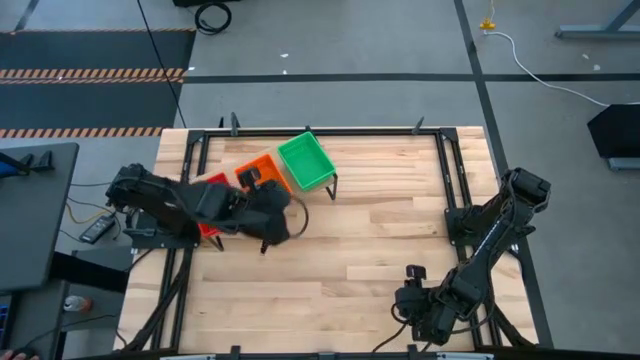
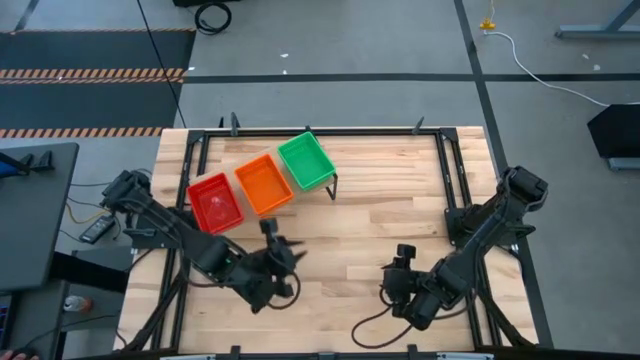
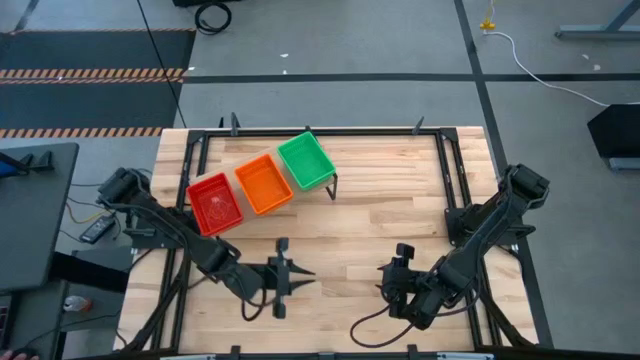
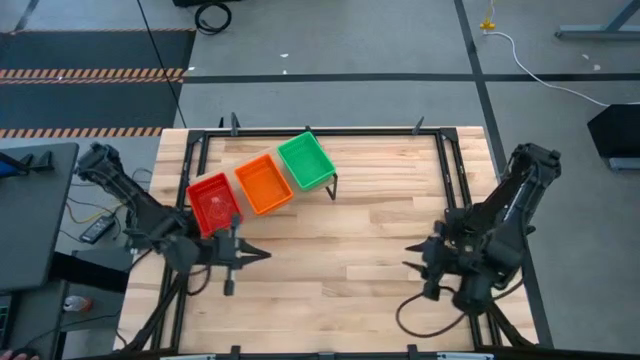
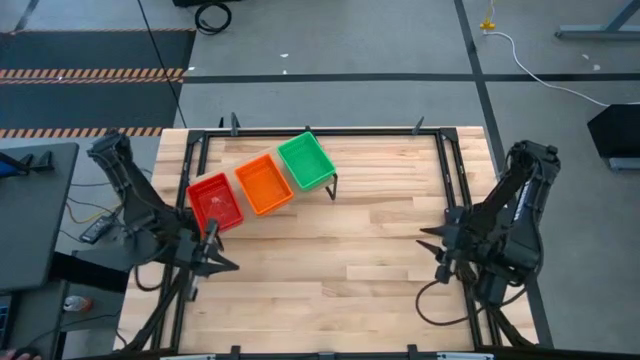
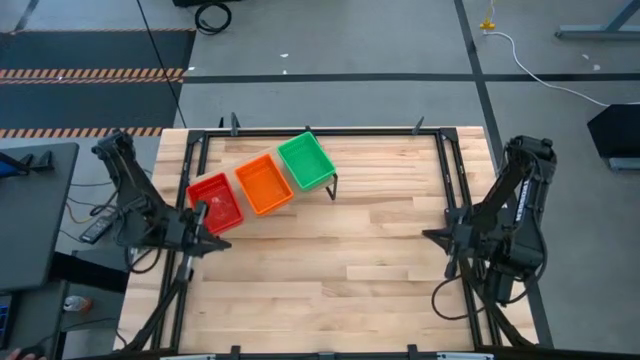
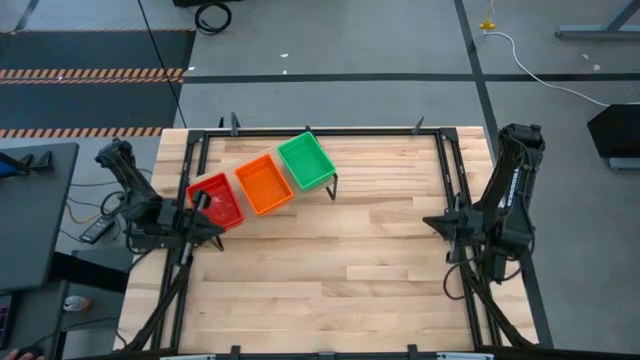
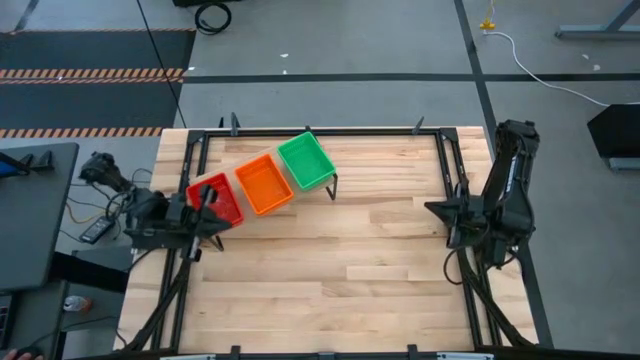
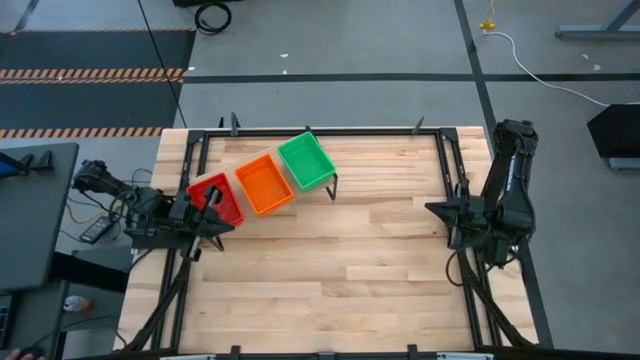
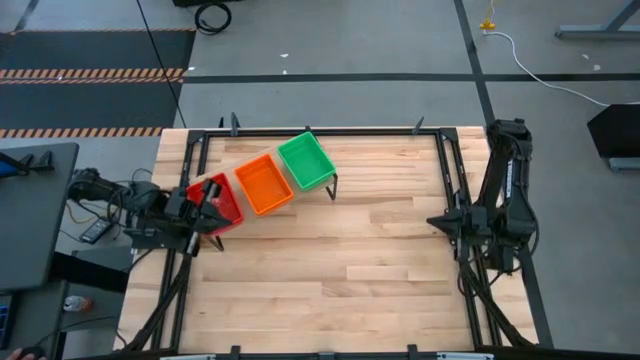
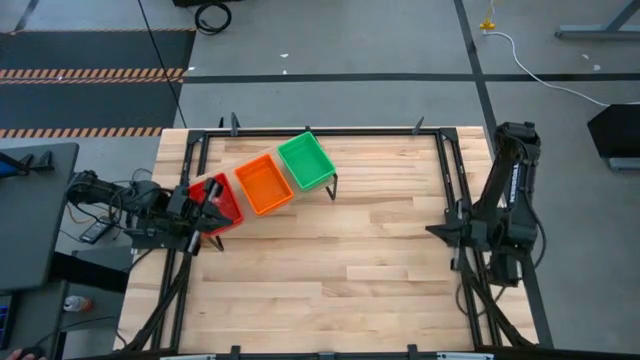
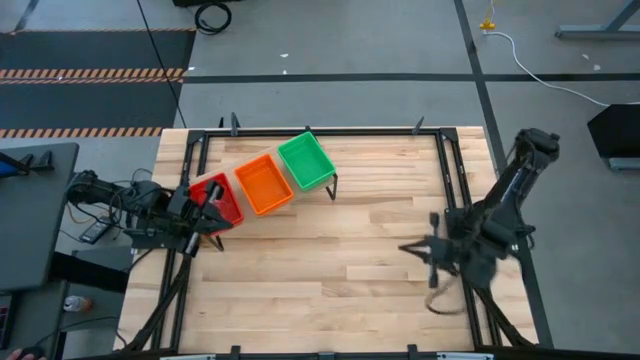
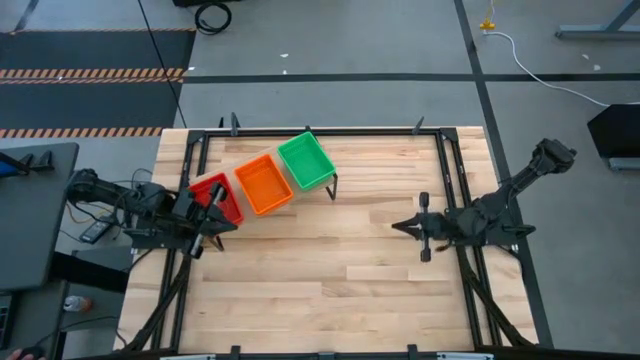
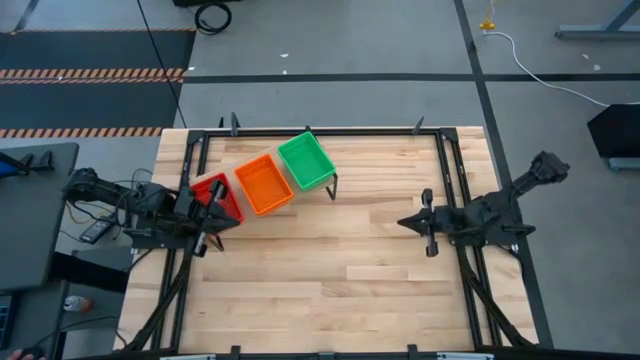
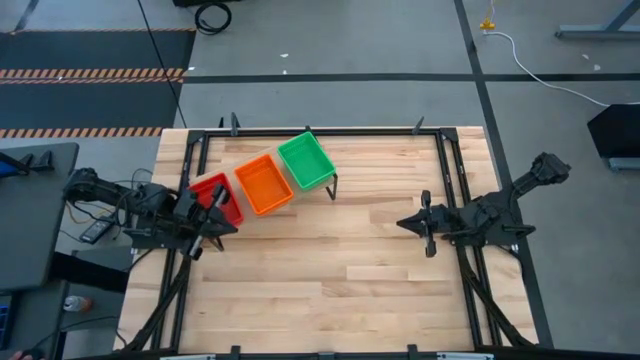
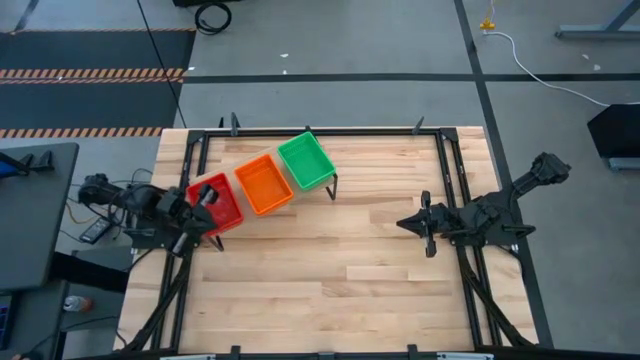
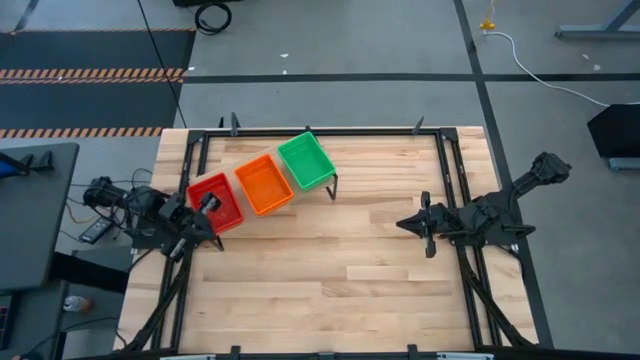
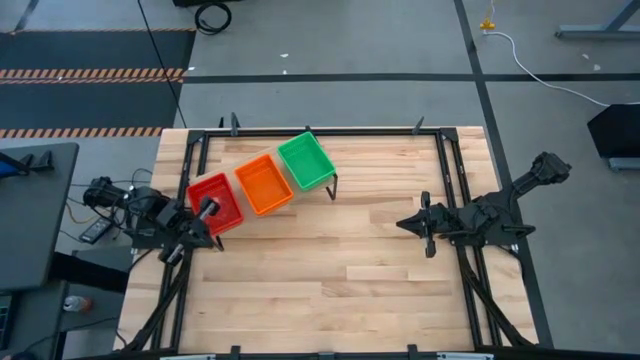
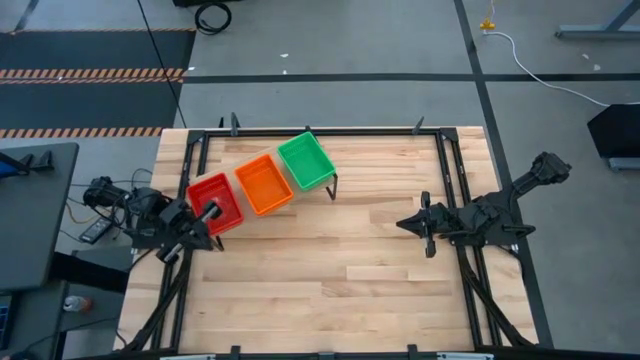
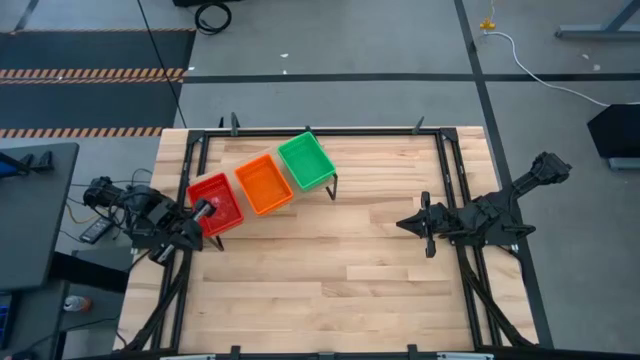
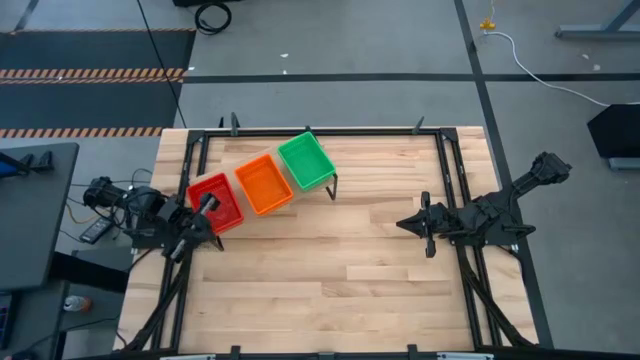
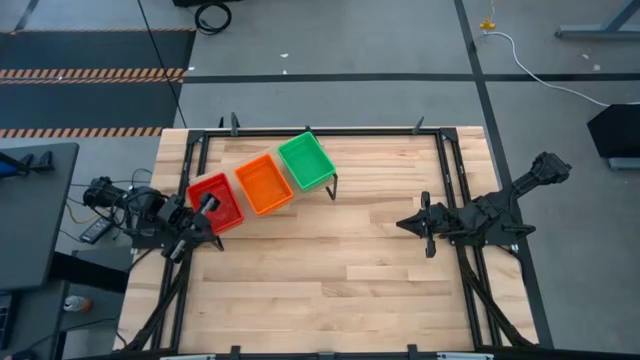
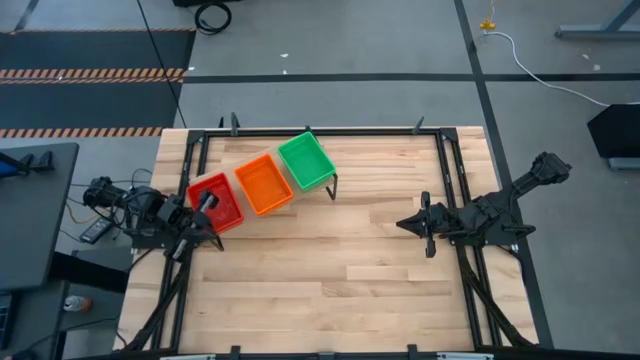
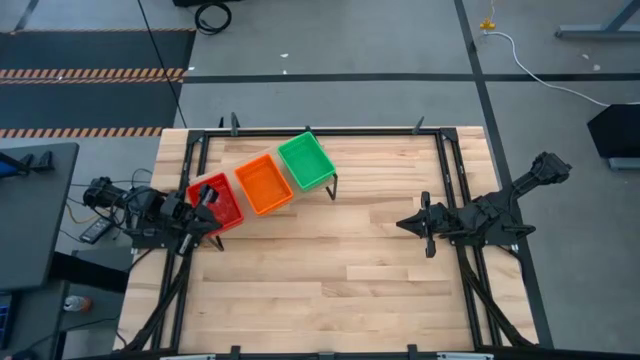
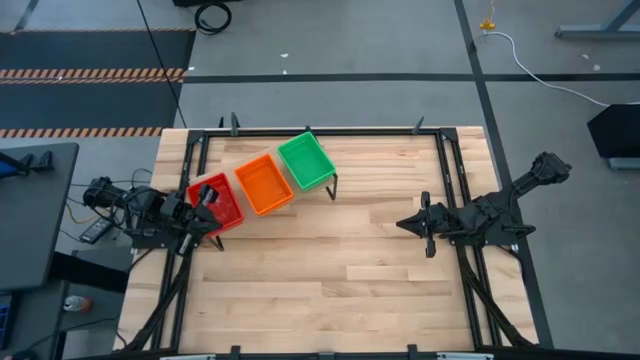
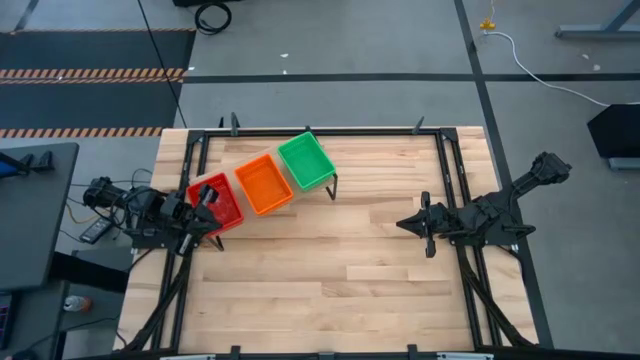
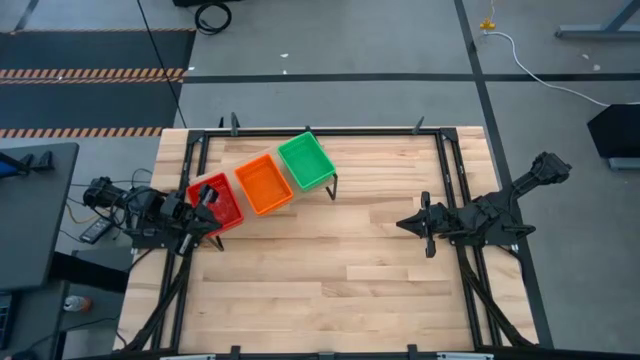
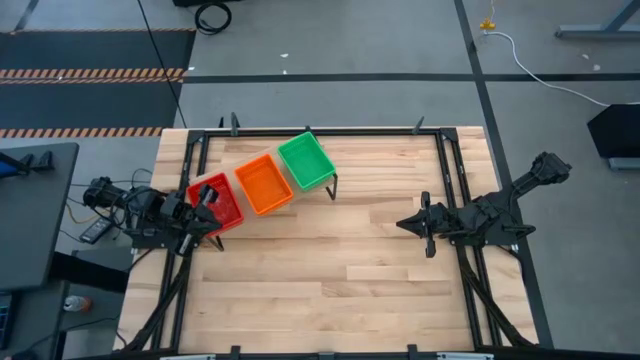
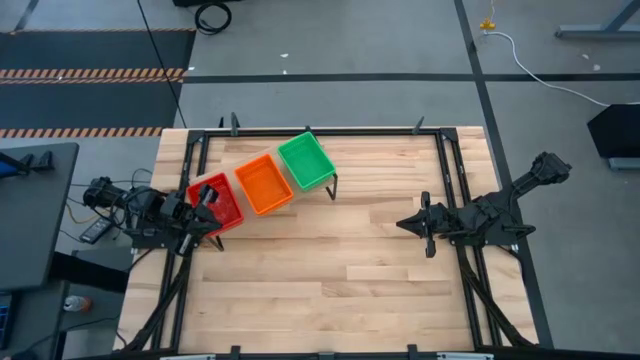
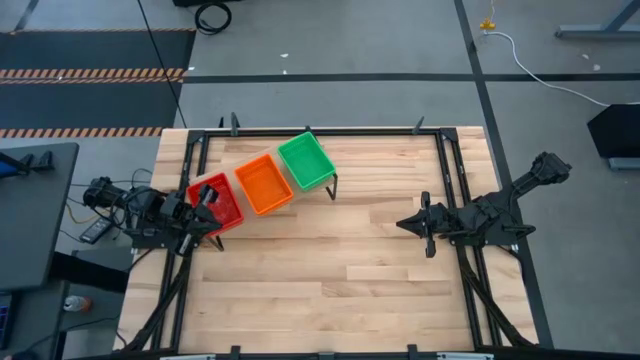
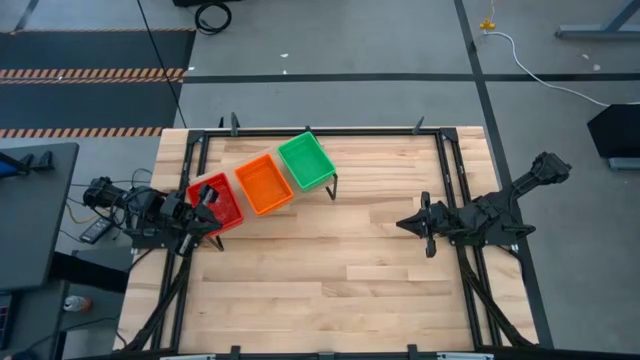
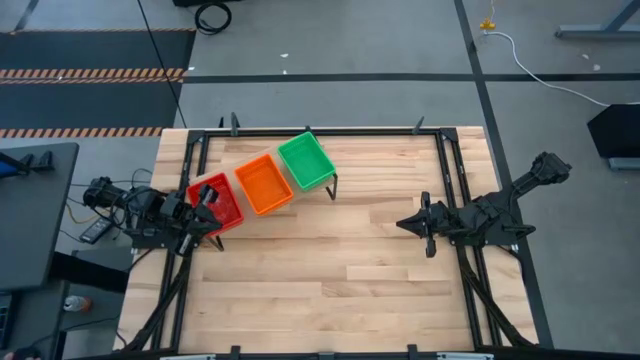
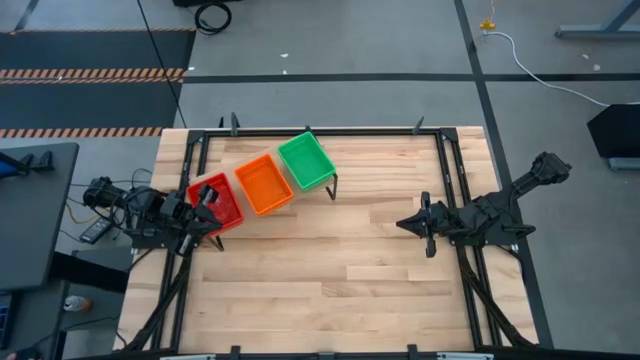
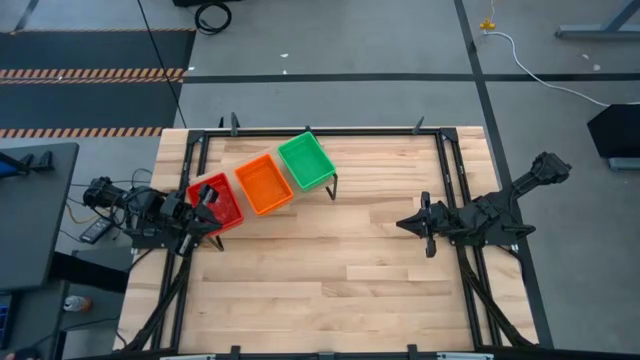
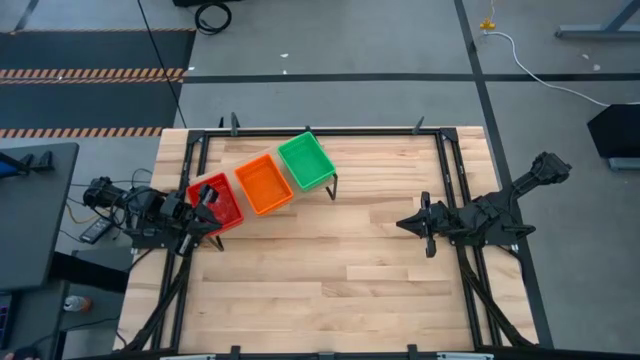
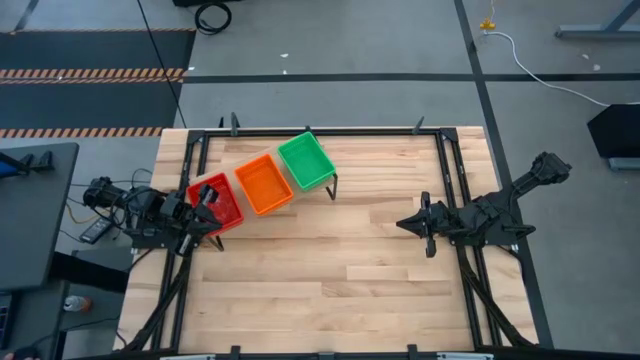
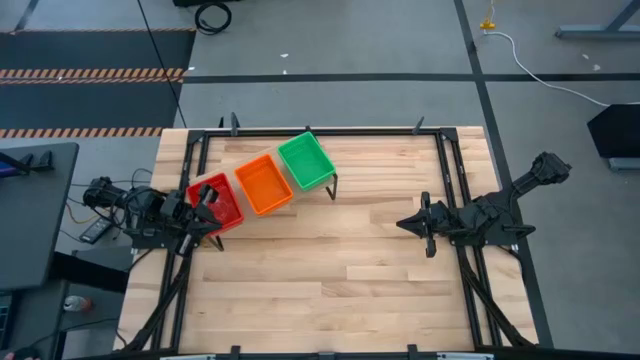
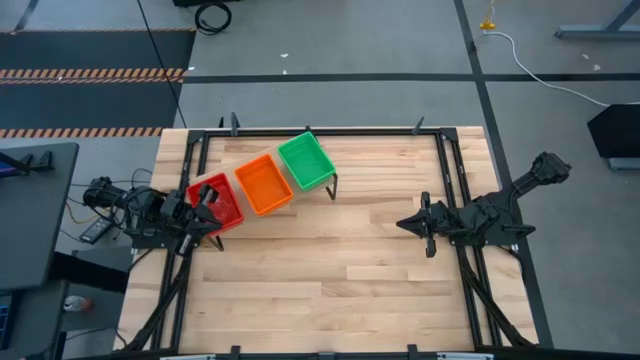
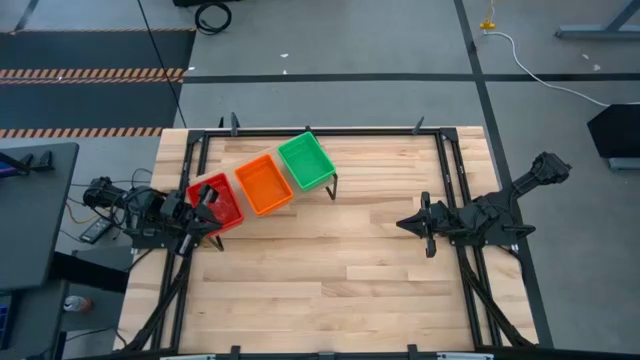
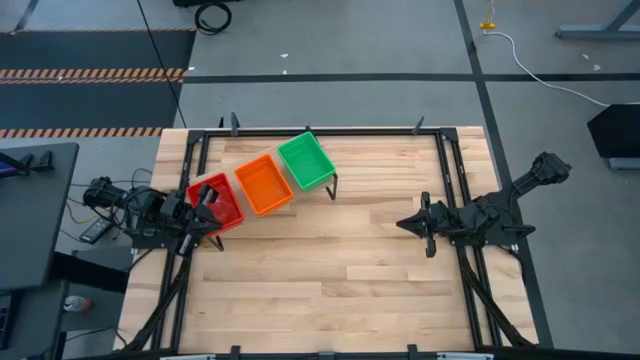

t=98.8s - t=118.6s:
Task: Stack baskets on shelf by color
Return to Home Position

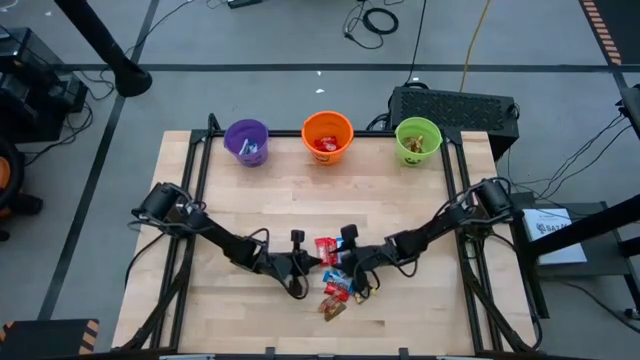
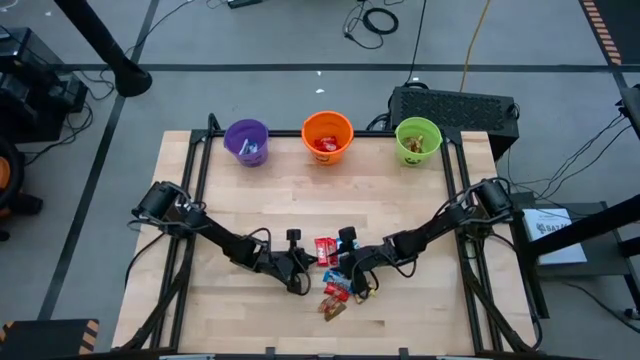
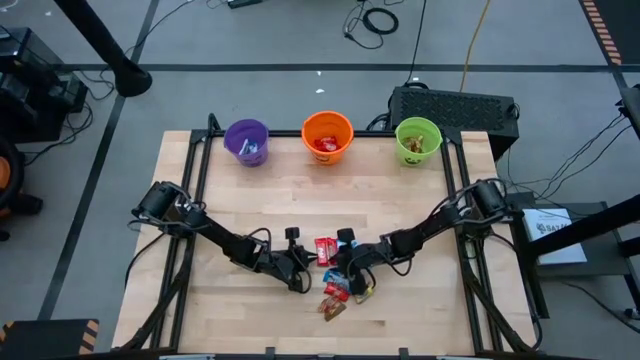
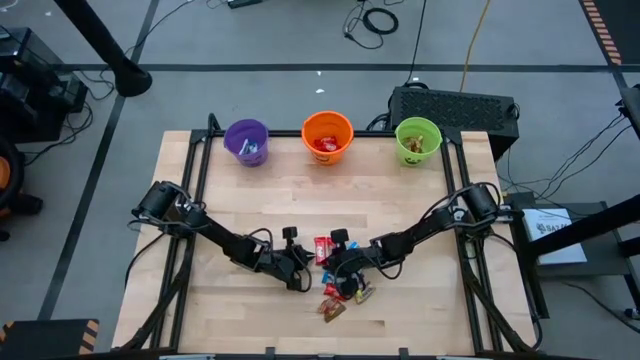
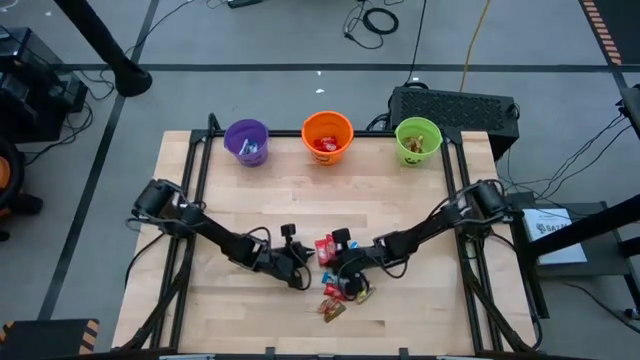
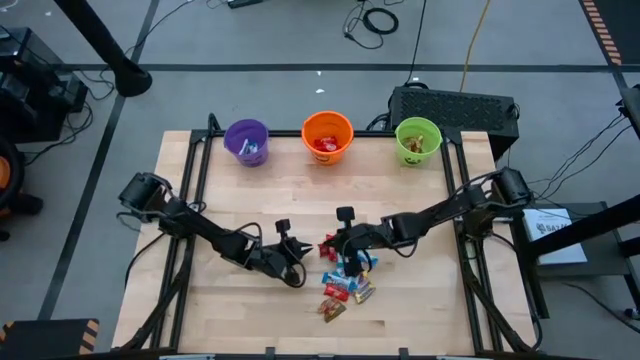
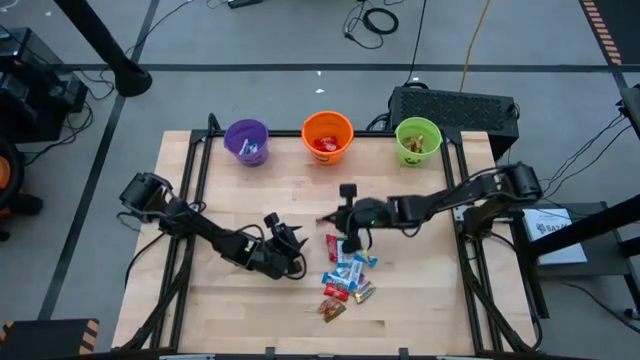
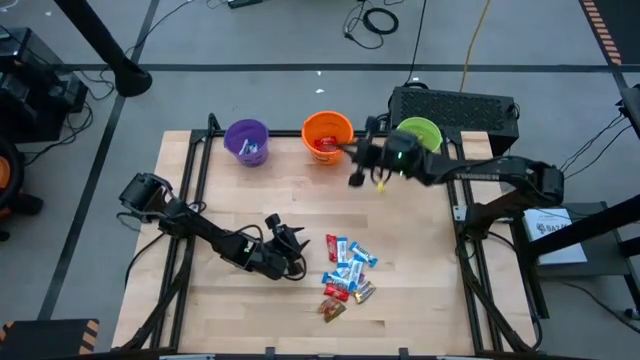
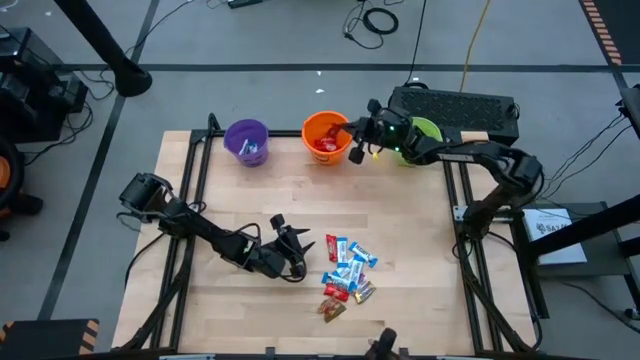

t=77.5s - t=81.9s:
Task: Sort candy by brand, put in halloween buckets
Put the red chocolate into the orange bucket
